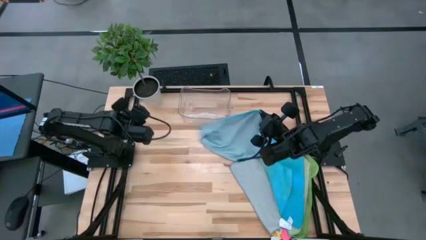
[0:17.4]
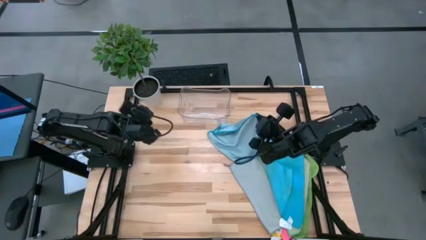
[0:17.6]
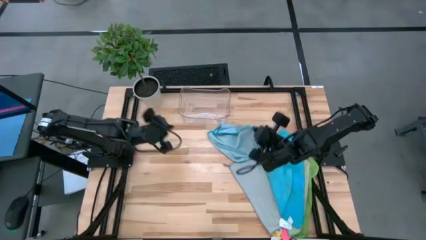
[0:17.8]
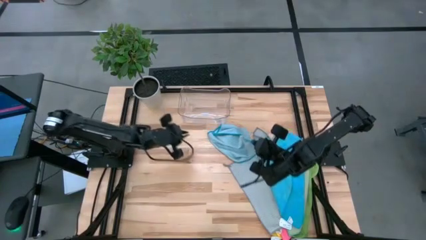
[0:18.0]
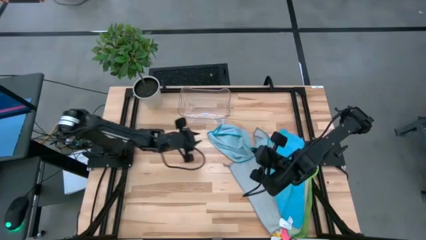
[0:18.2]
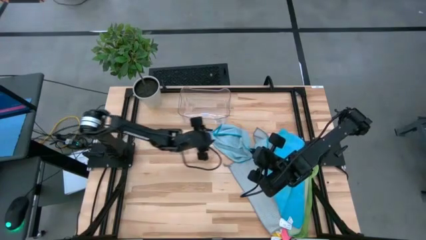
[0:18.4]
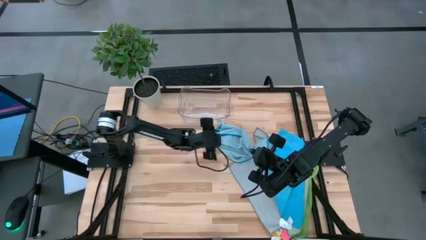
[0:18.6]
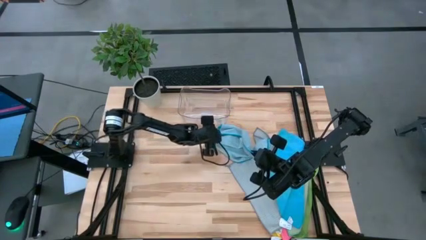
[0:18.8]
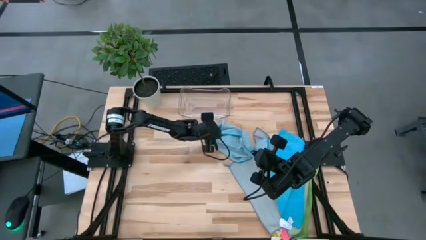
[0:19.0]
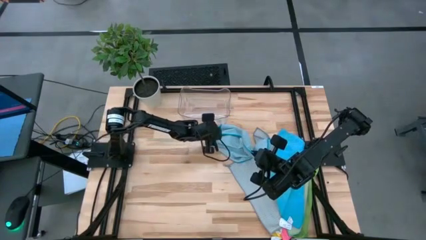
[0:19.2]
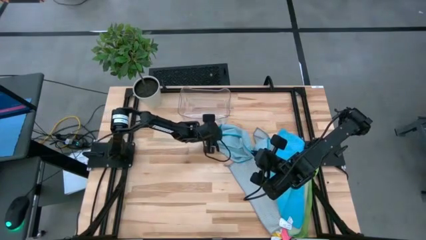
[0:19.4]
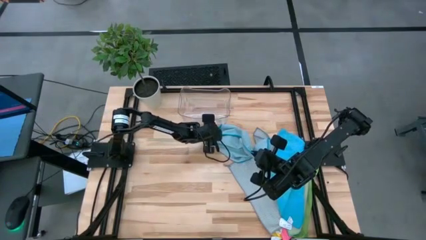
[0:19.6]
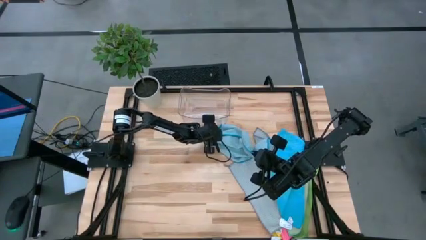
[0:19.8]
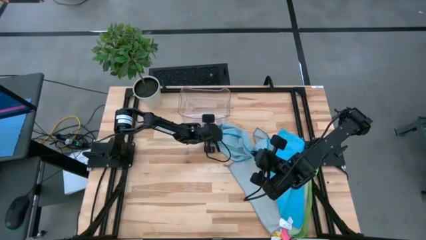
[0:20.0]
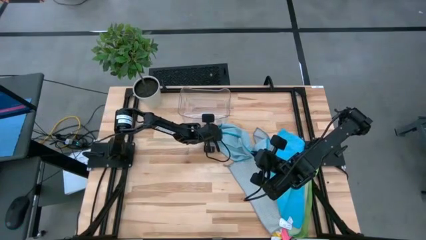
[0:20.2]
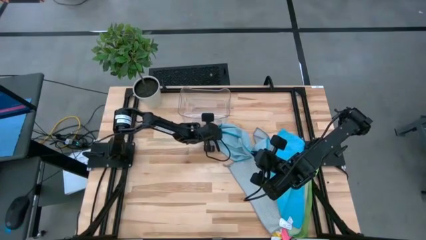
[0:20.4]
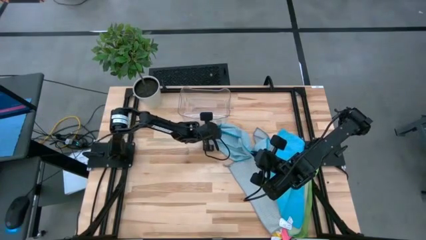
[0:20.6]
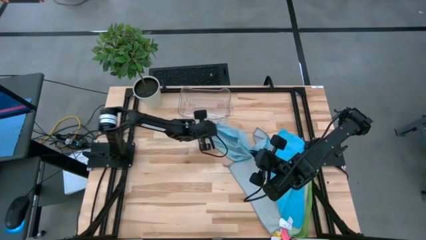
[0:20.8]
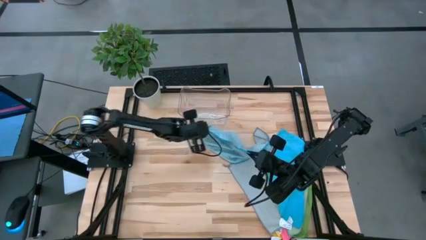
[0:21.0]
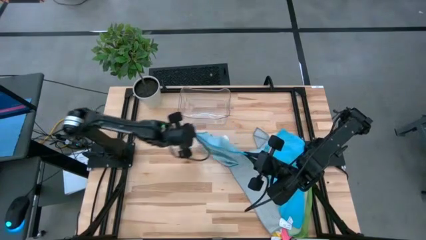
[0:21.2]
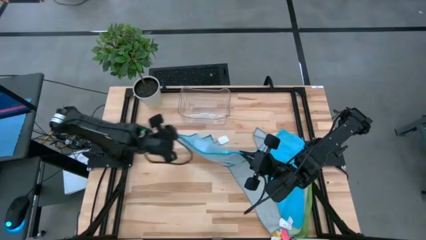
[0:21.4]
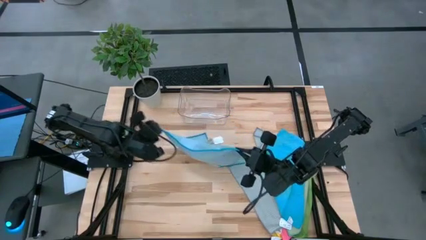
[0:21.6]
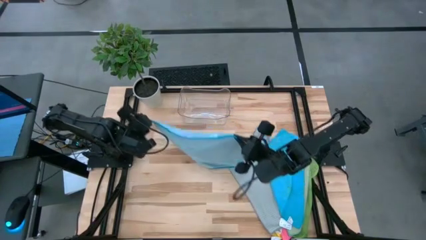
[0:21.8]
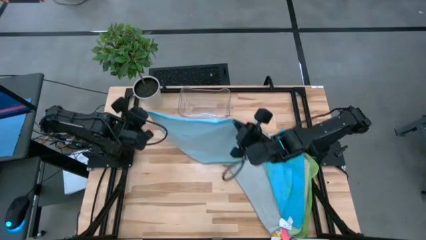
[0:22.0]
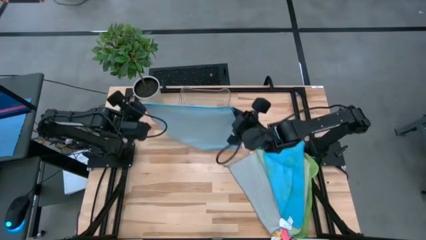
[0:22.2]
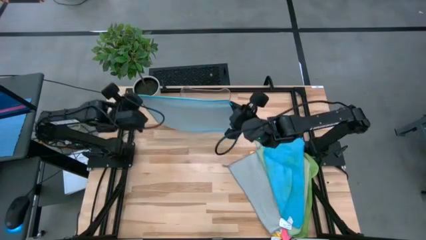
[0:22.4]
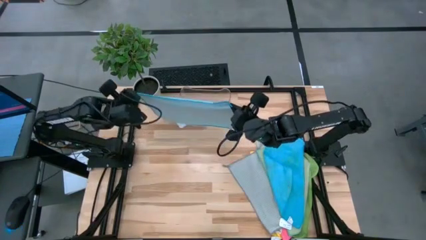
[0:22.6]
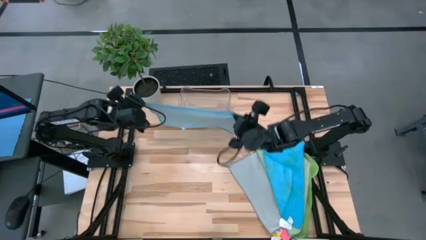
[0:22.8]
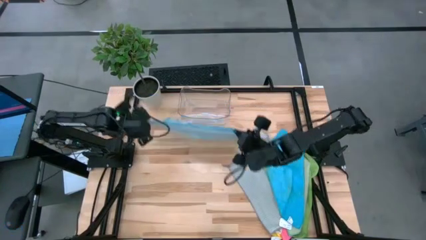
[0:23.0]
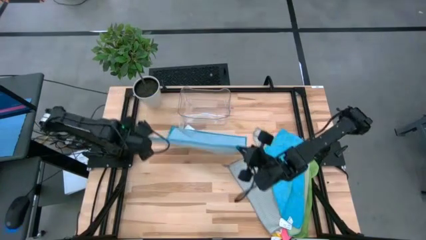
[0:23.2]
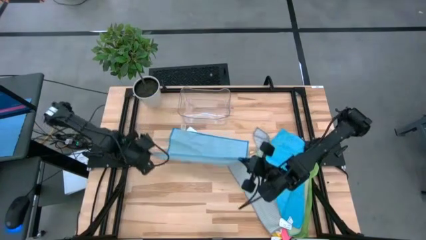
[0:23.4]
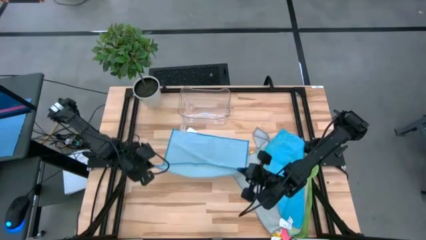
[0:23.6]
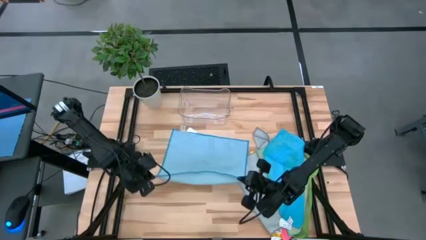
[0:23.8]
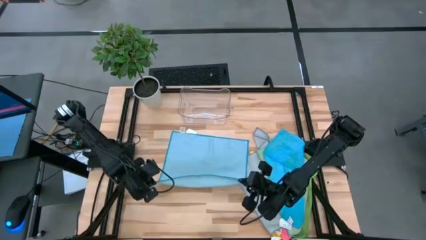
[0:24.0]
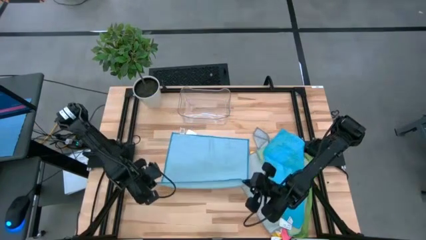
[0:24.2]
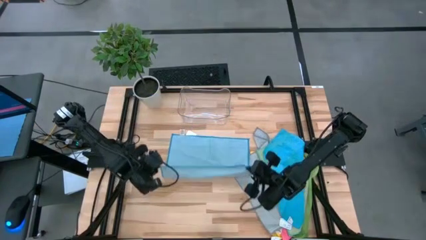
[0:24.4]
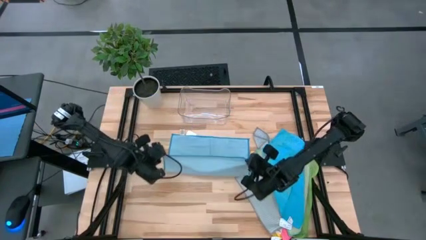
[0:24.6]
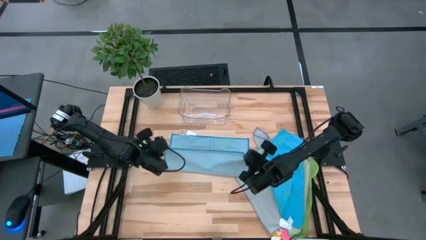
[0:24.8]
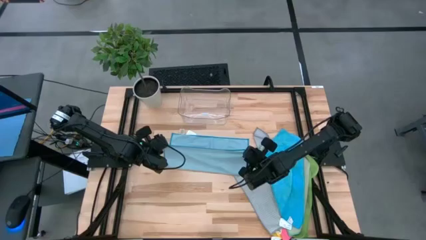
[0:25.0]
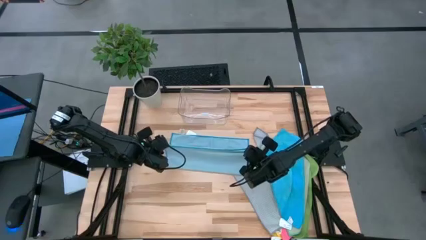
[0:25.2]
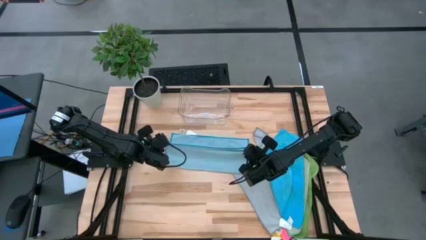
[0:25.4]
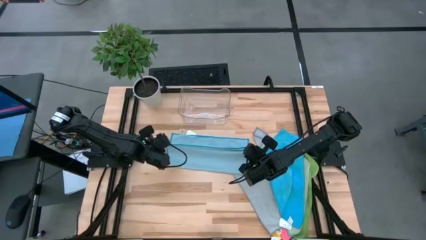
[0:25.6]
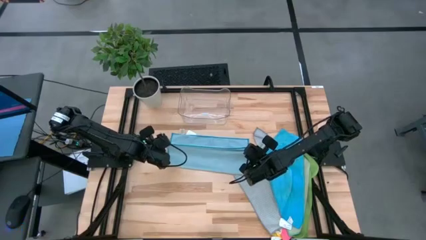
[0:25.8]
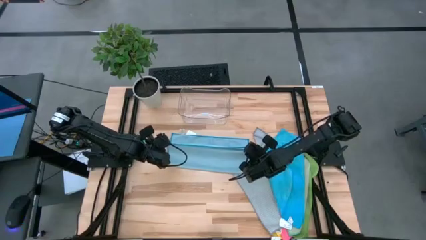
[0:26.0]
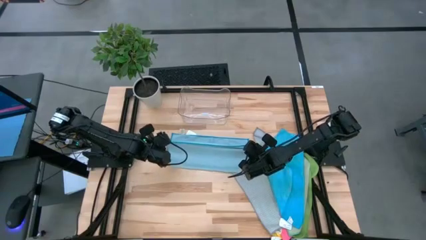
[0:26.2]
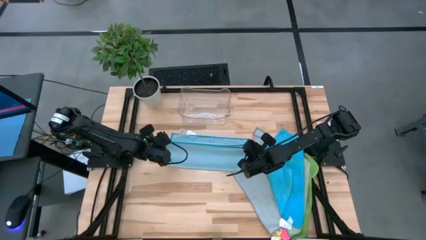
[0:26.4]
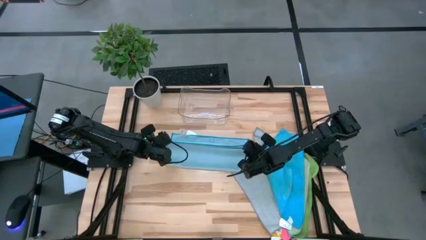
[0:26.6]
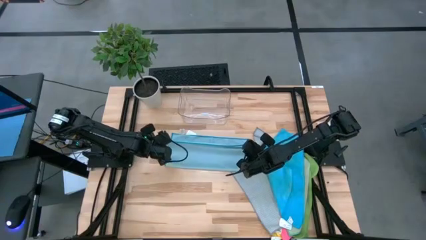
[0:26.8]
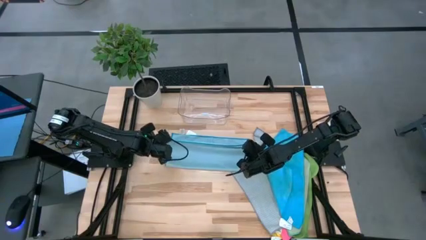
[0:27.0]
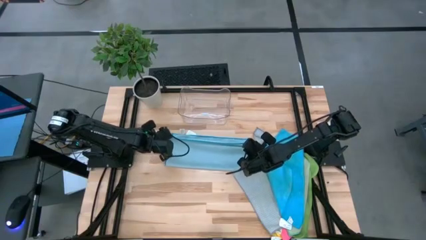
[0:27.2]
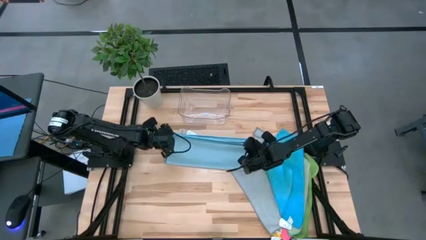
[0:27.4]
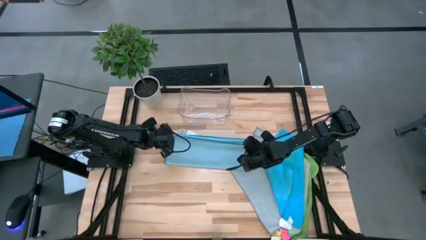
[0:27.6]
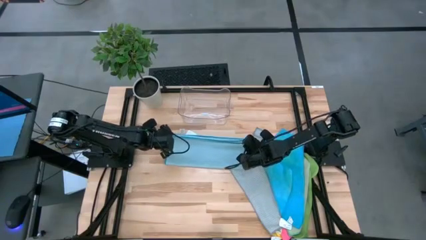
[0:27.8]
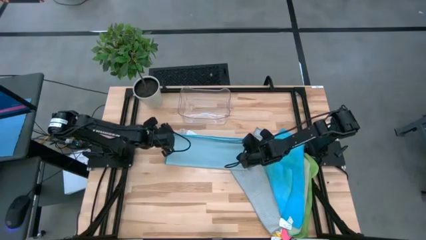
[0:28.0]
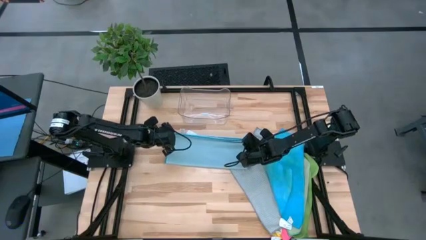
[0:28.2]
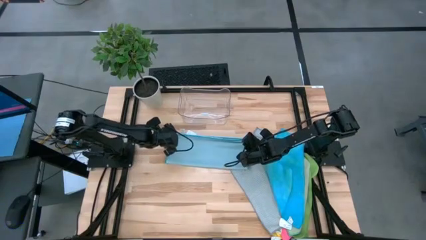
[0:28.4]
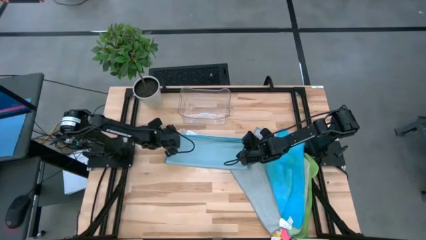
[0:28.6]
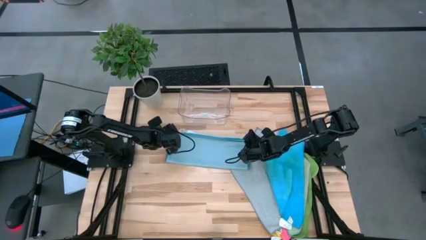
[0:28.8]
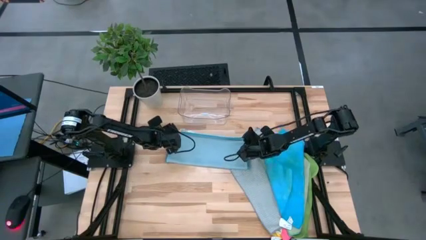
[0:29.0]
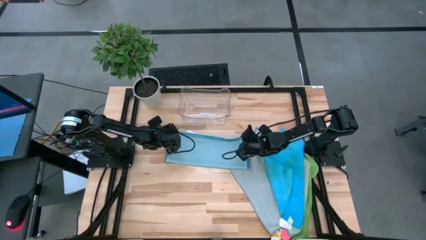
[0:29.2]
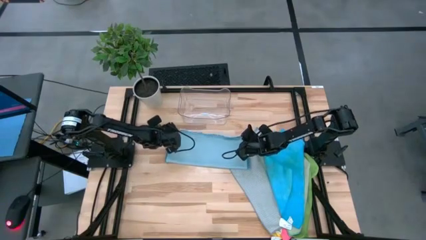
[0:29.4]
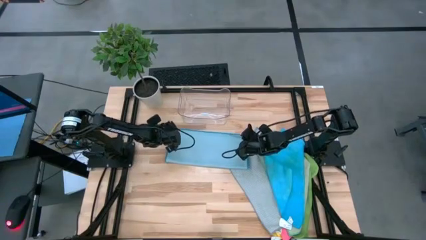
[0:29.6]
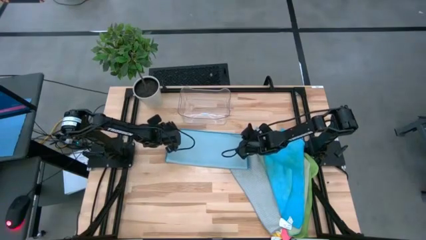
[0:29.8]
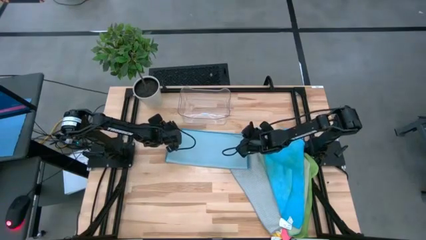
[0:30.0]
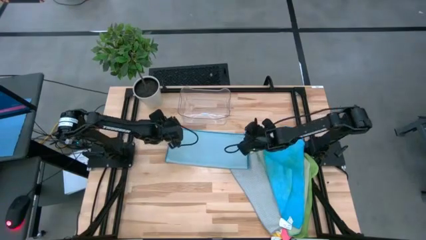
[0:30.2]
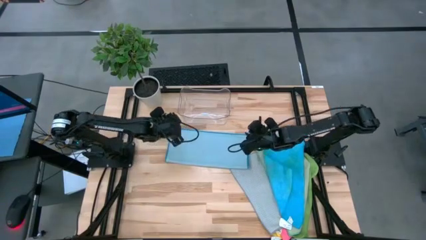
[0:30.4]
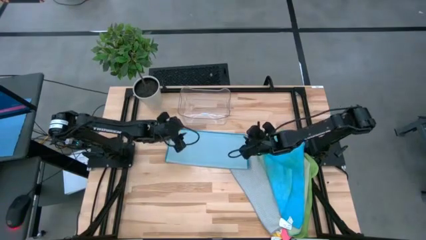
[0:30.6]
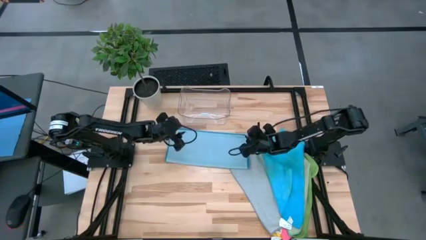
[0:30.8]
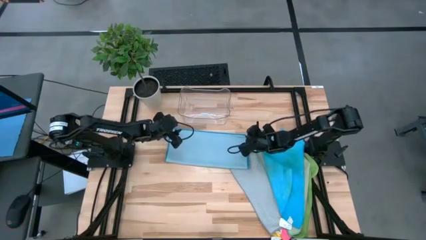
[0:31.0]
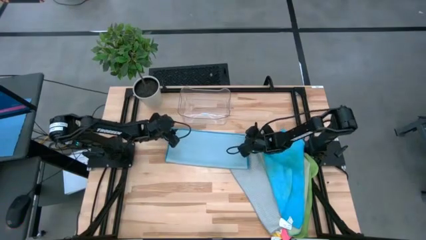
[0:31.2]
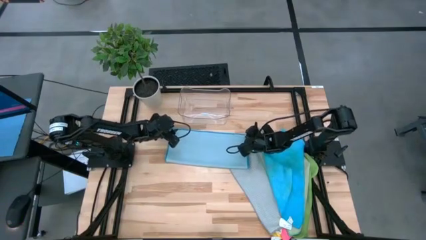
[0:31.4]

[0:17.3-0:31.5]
Task: Fold microfiber towels
Fold the light blue microfiber cloth
